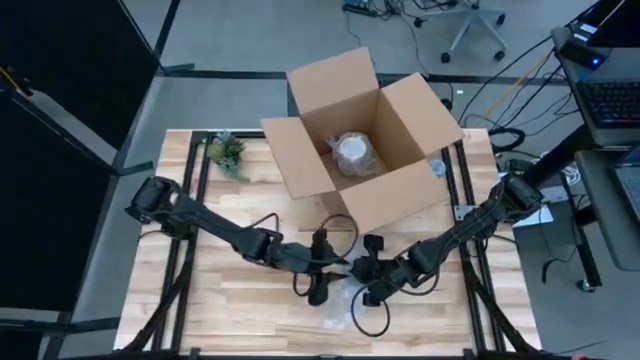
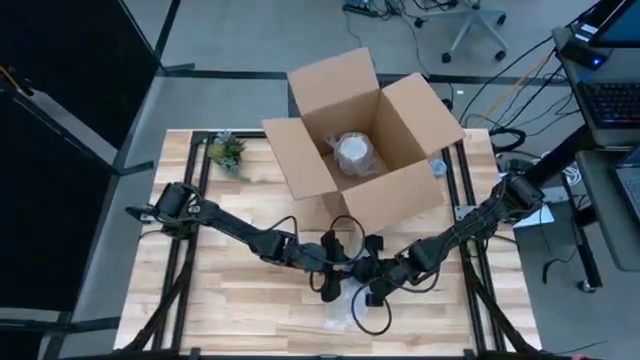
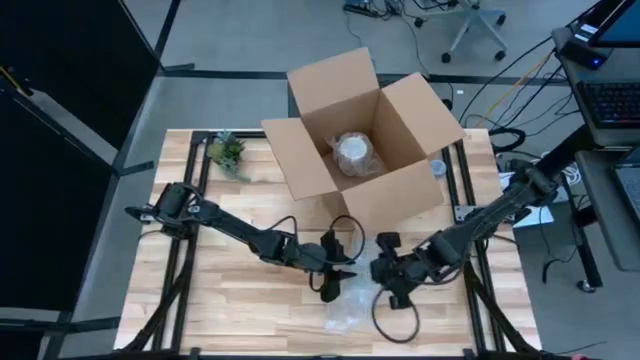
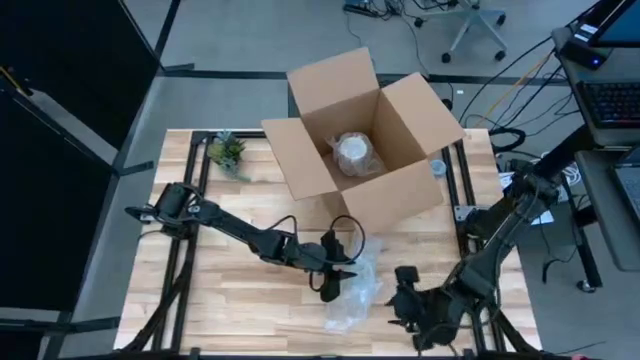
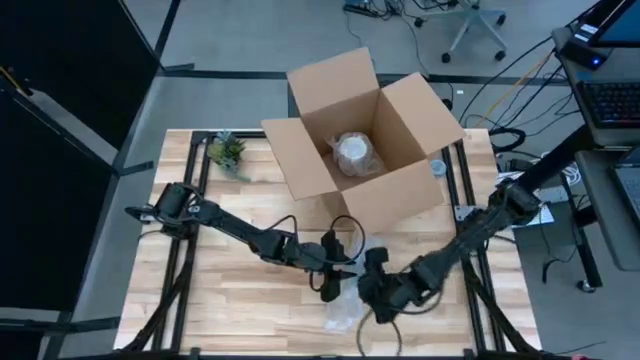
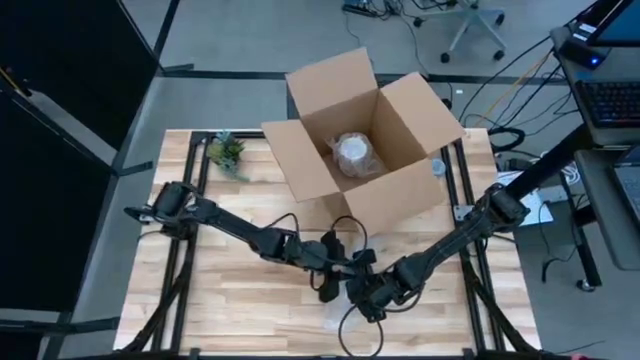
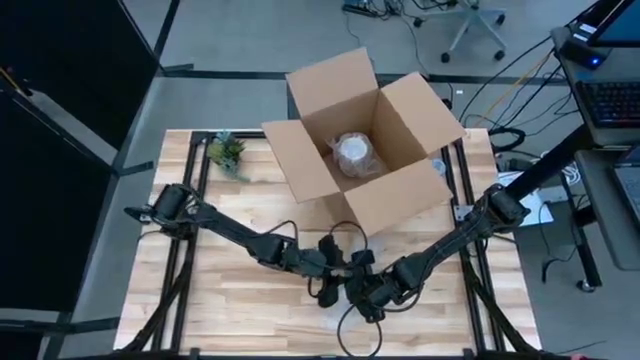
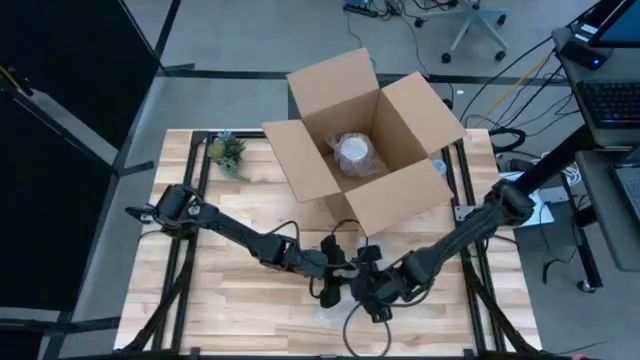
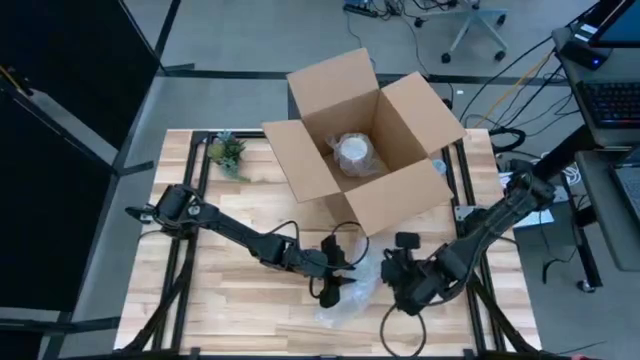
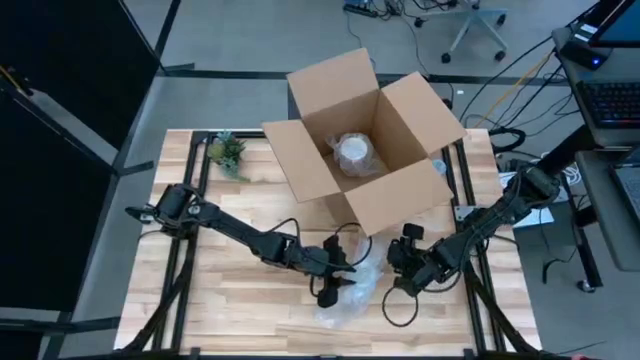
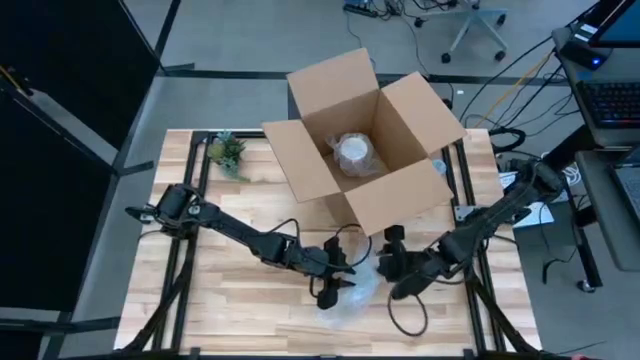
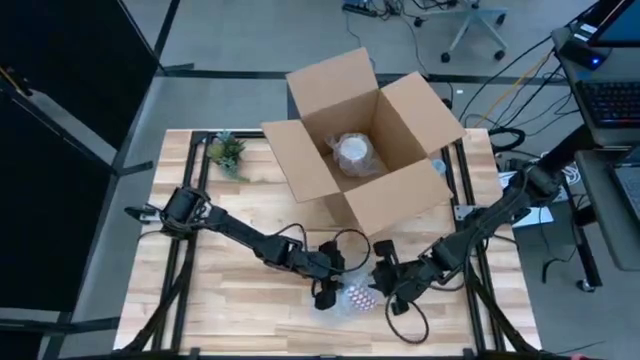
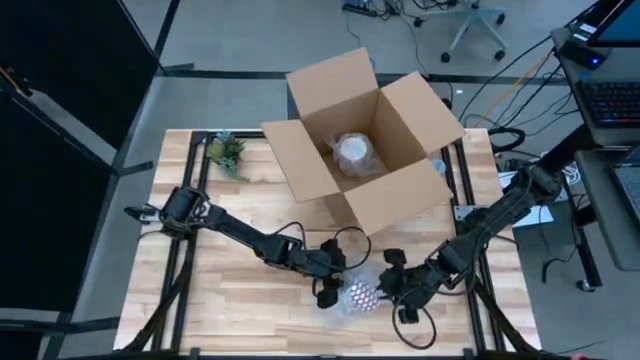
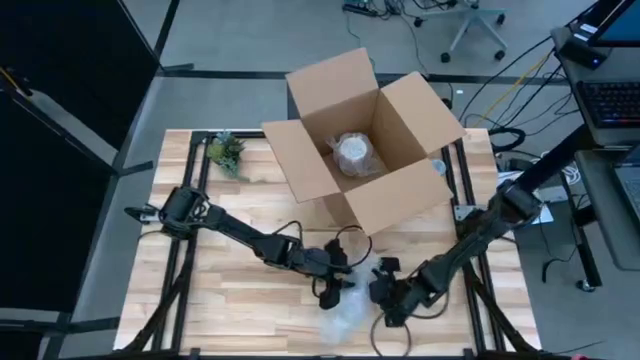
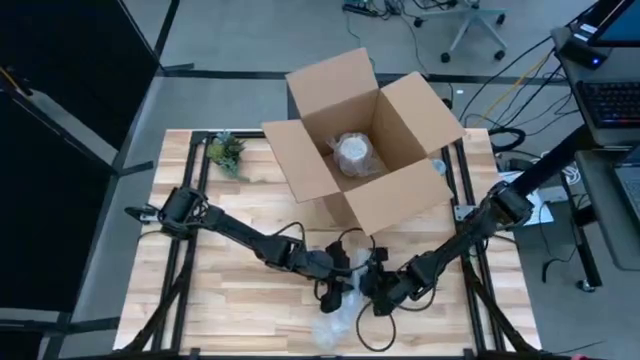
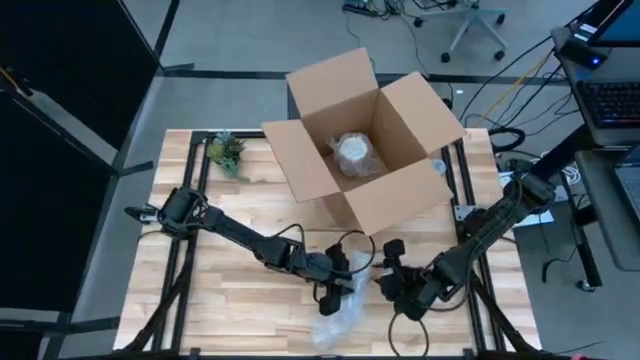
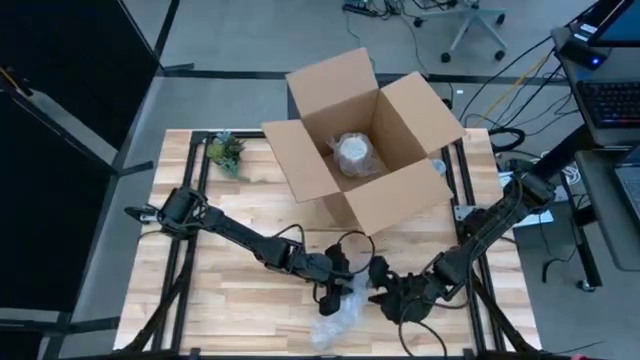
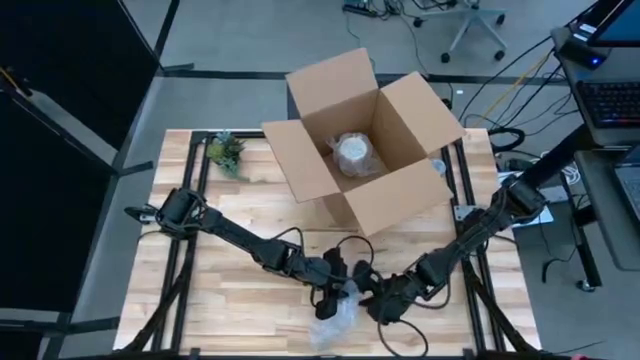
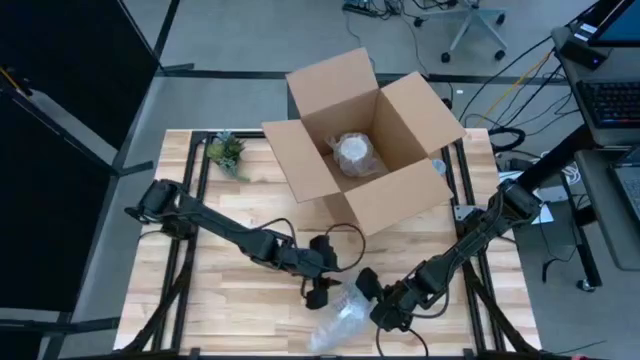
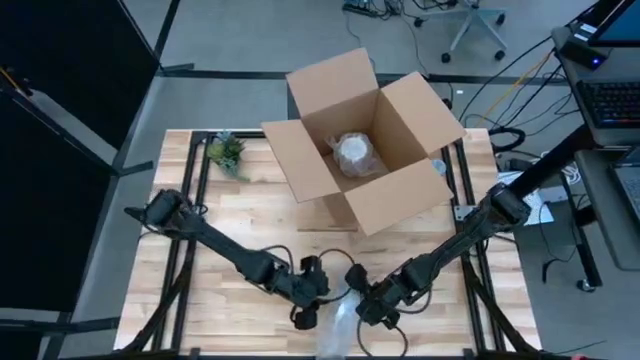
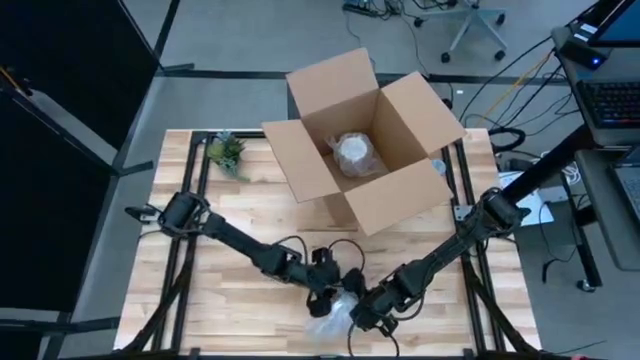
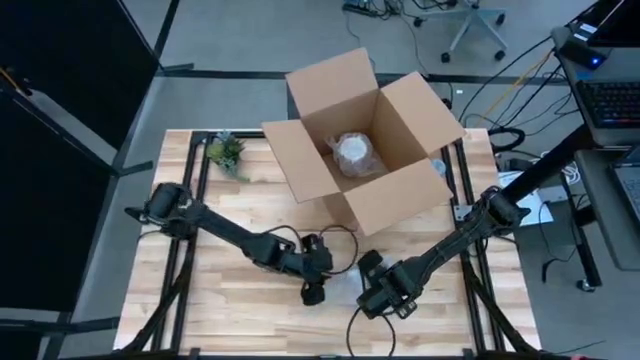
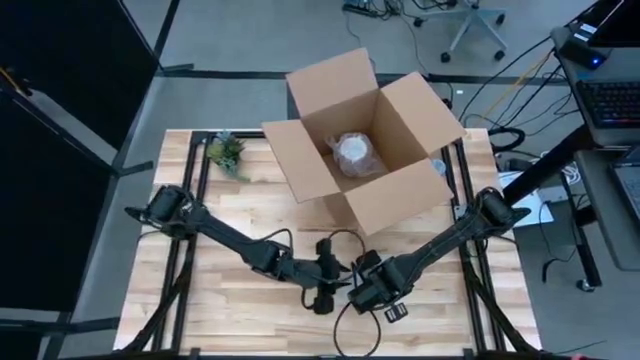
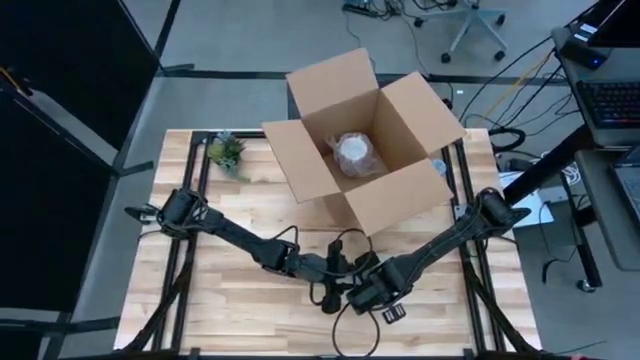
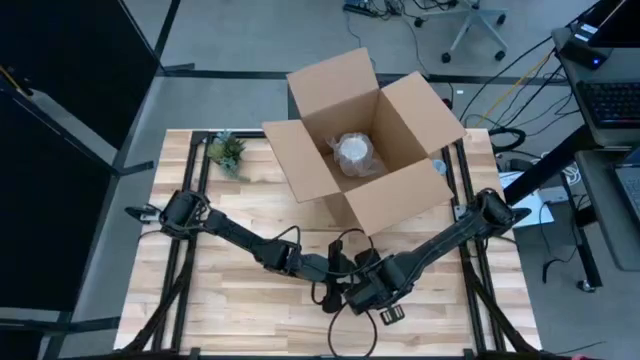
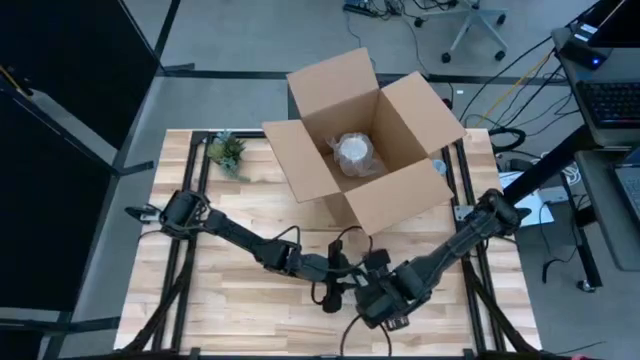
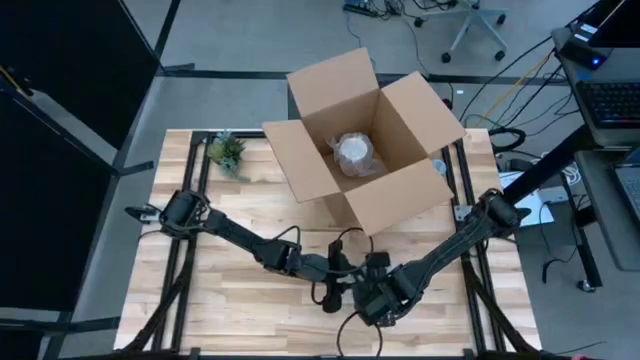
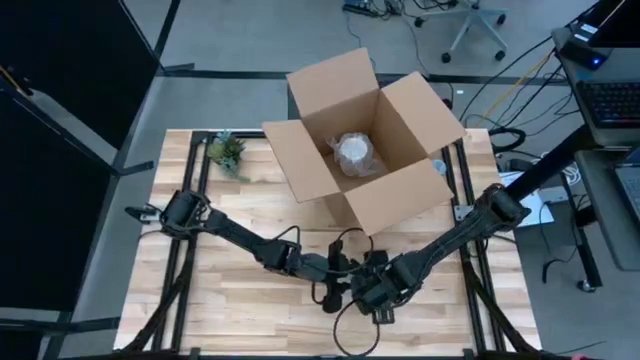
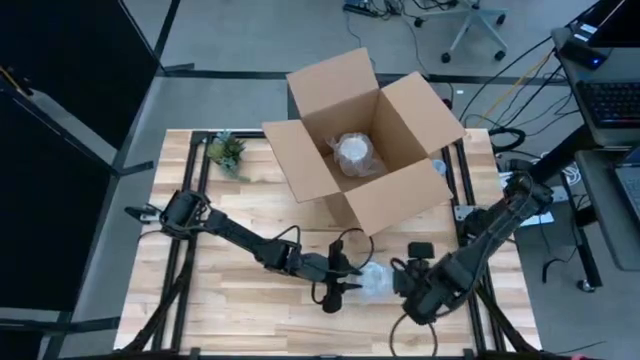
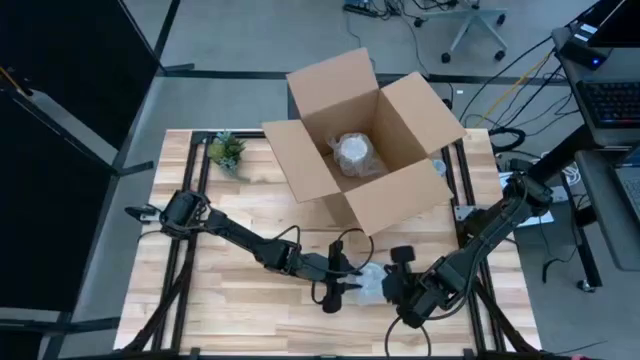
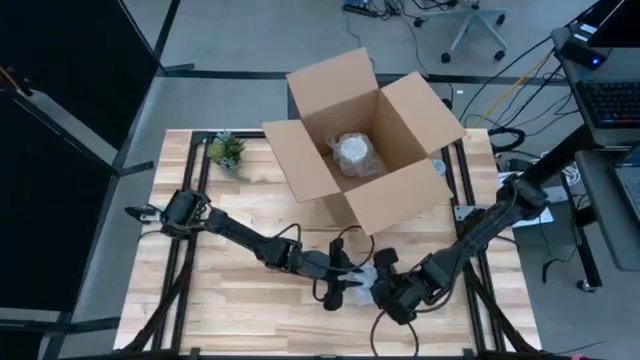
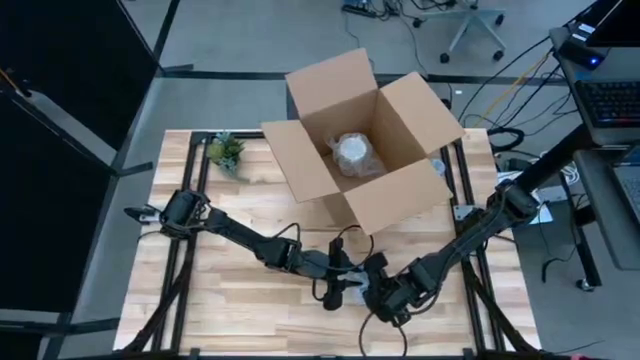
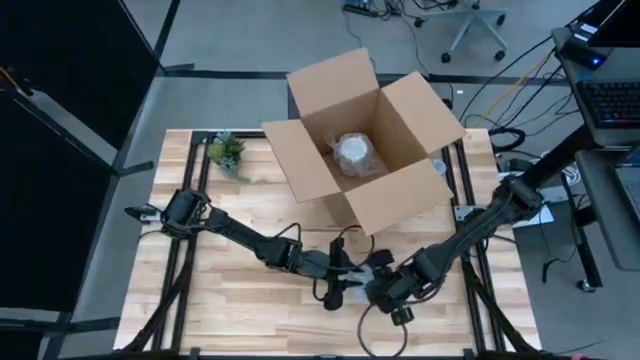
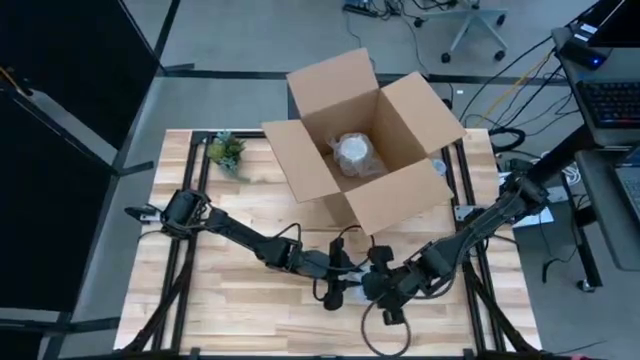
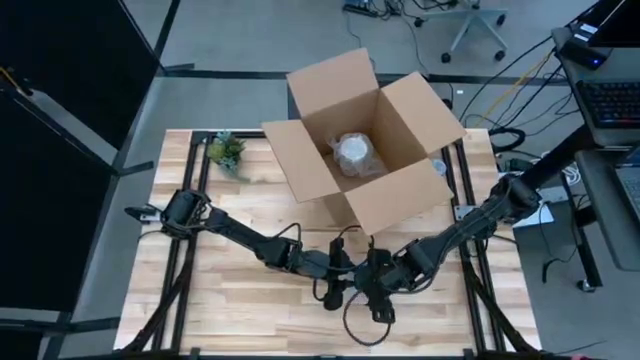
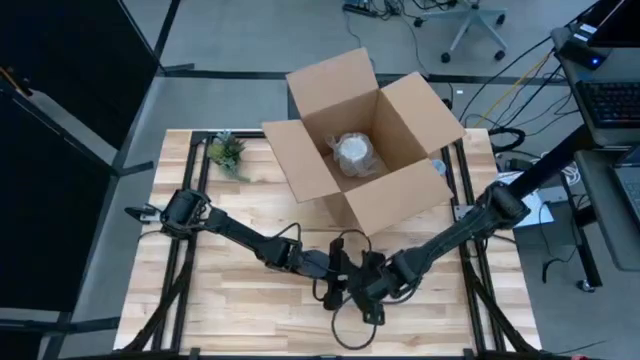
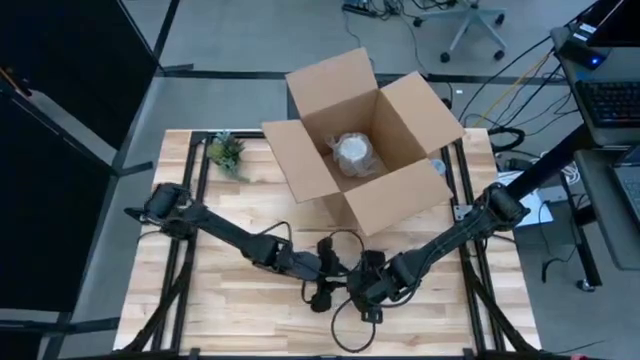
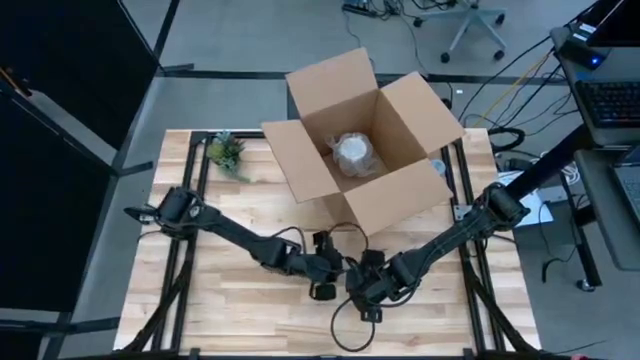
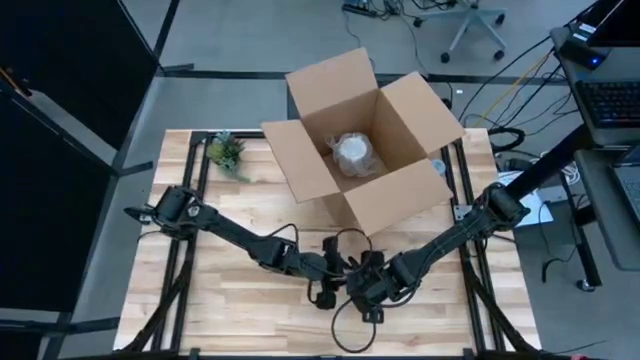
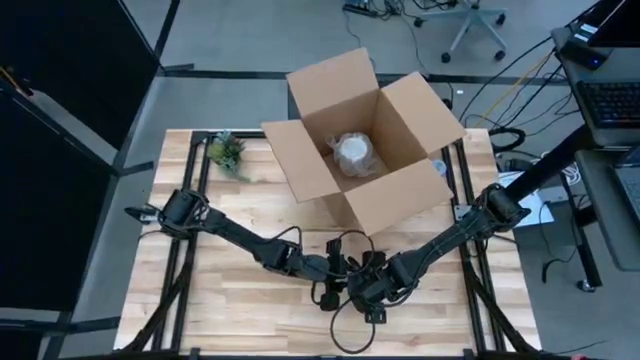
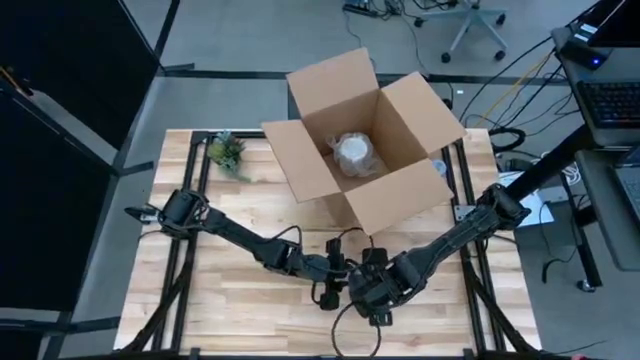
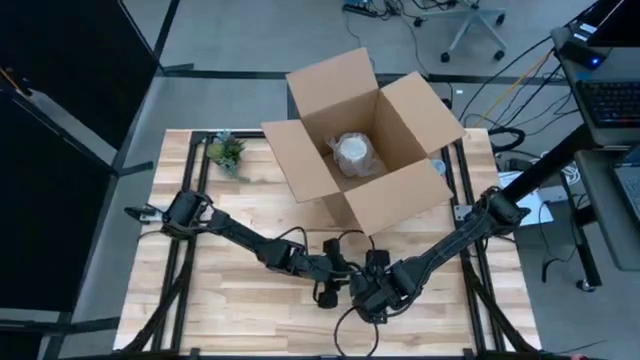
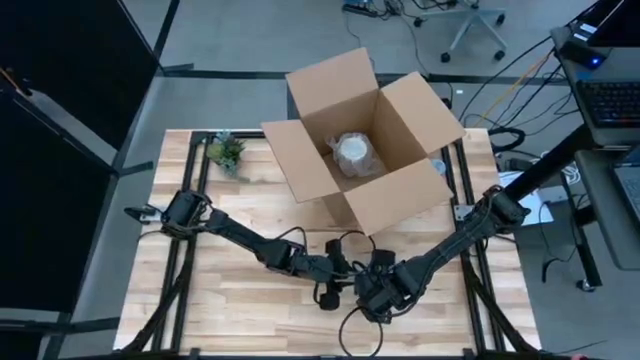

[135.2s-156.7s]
Task: wrap mug
Wrap the red mug with the bubble wrap

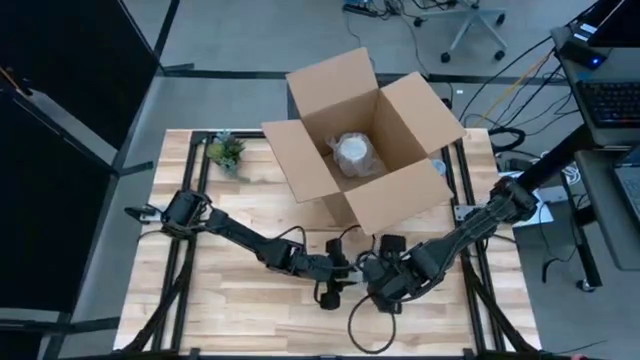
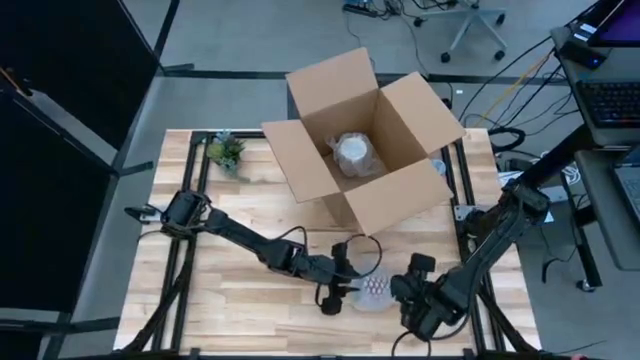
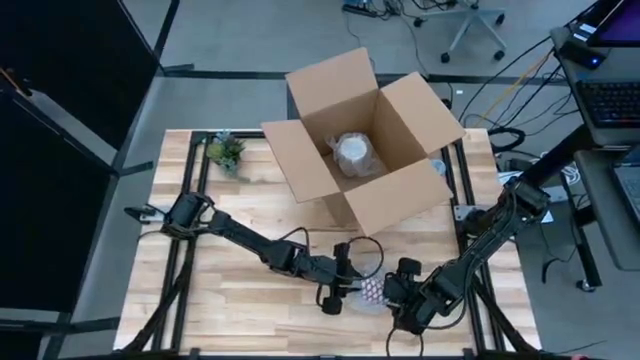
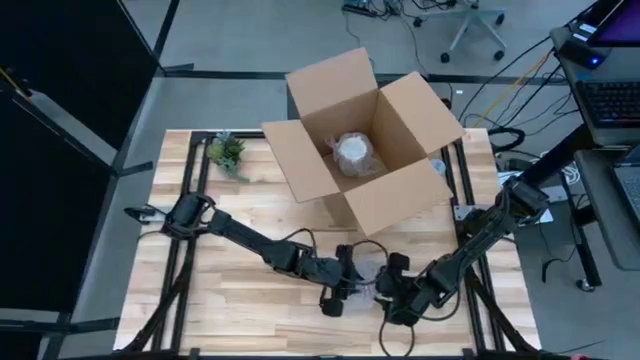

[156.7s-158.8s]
Wrap the red mug with the bubble wrap
